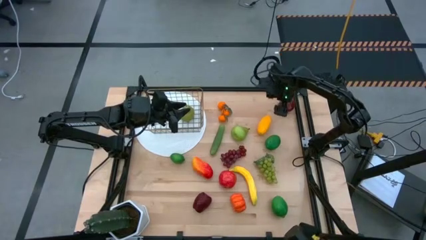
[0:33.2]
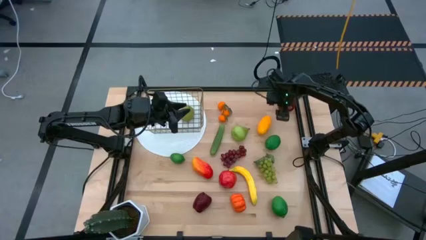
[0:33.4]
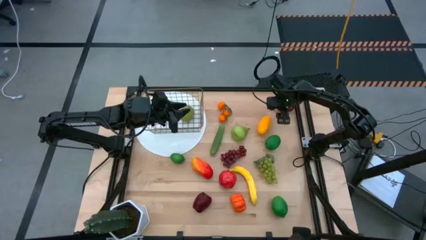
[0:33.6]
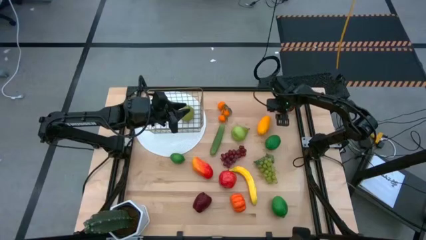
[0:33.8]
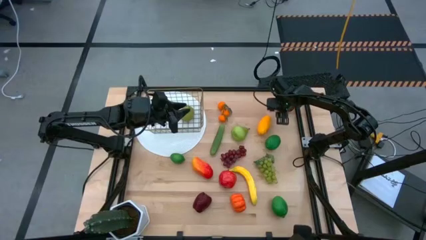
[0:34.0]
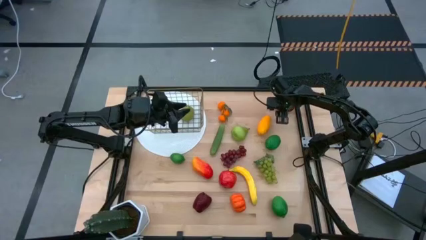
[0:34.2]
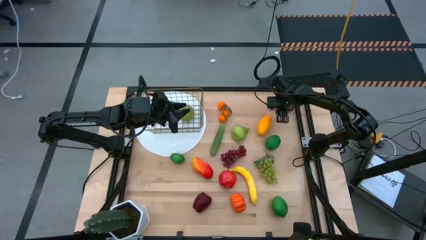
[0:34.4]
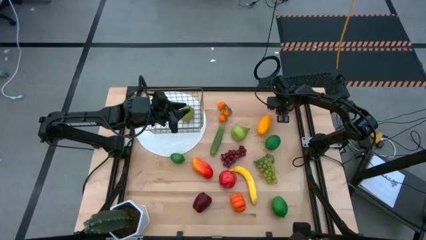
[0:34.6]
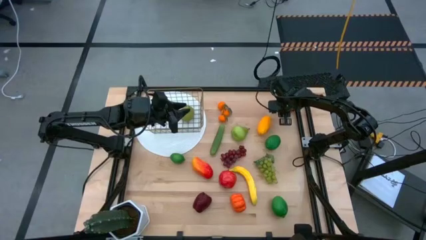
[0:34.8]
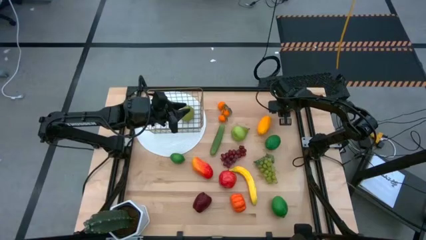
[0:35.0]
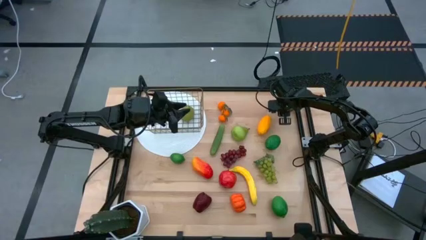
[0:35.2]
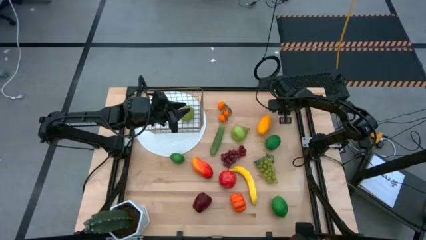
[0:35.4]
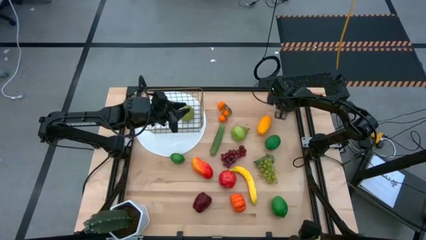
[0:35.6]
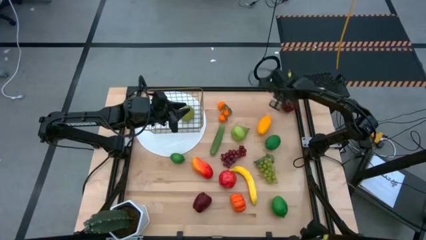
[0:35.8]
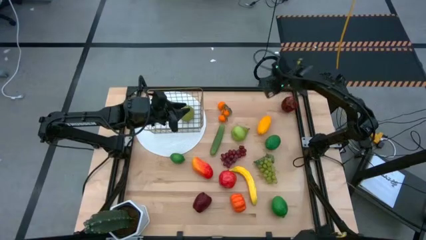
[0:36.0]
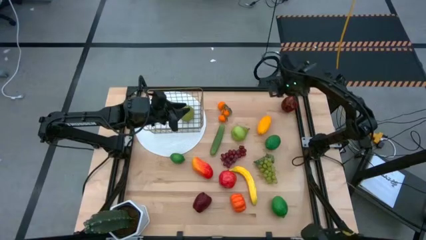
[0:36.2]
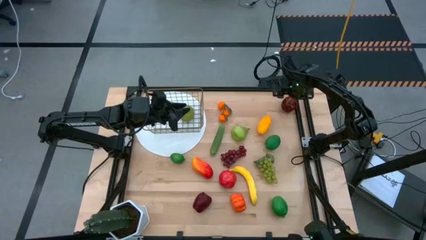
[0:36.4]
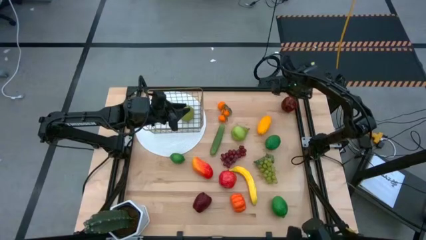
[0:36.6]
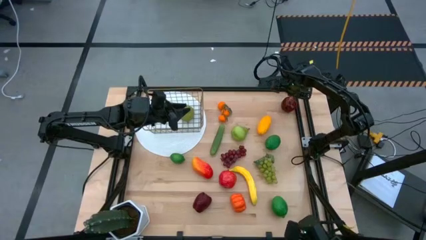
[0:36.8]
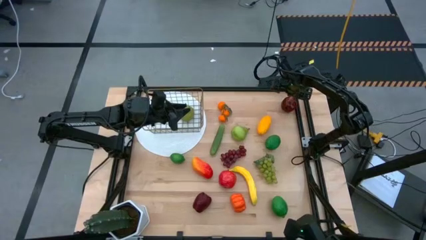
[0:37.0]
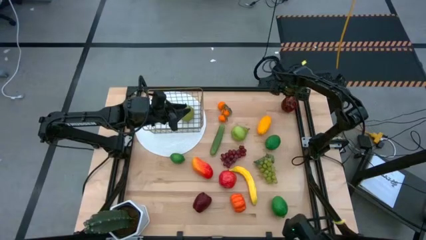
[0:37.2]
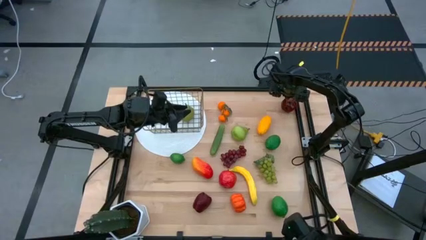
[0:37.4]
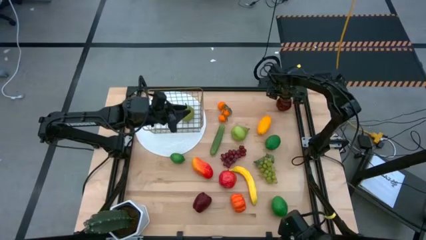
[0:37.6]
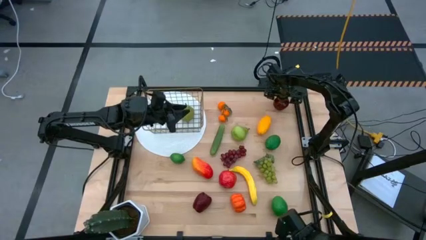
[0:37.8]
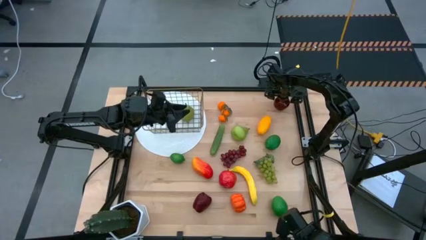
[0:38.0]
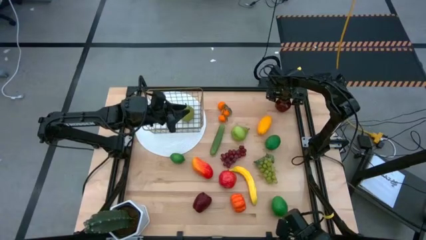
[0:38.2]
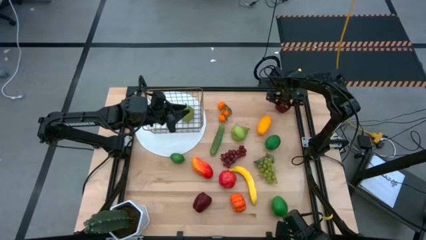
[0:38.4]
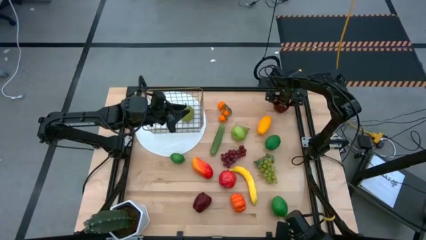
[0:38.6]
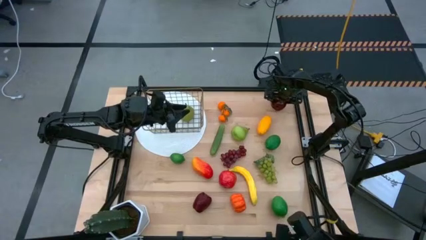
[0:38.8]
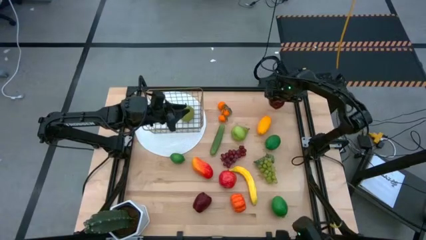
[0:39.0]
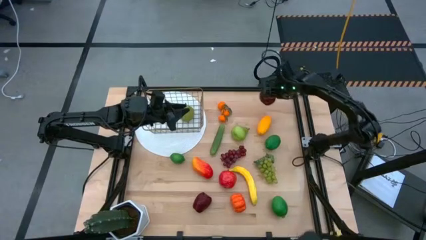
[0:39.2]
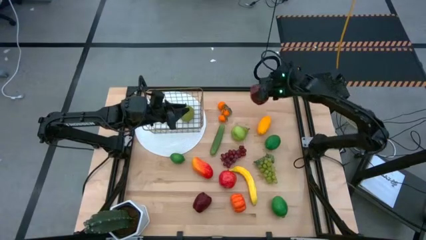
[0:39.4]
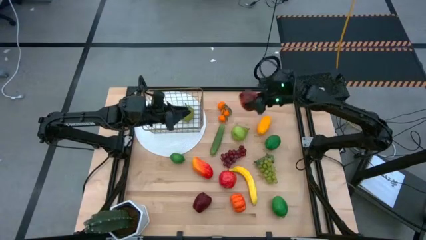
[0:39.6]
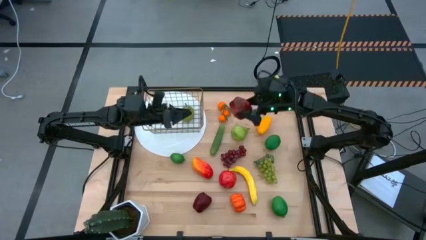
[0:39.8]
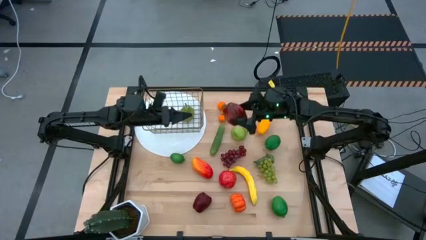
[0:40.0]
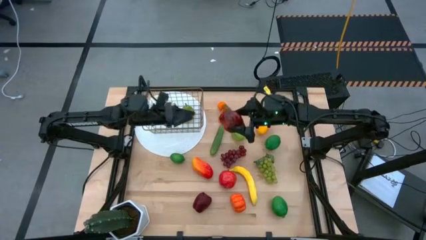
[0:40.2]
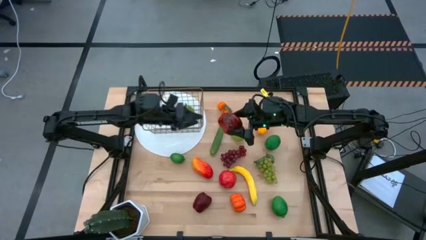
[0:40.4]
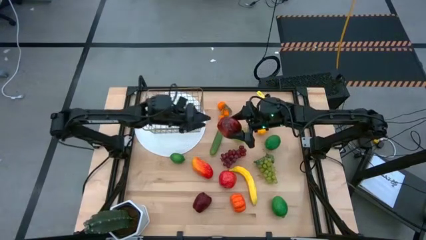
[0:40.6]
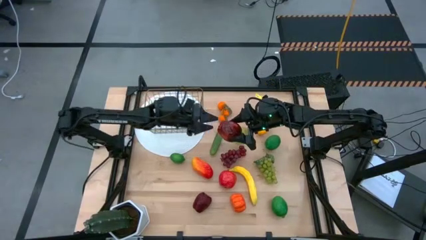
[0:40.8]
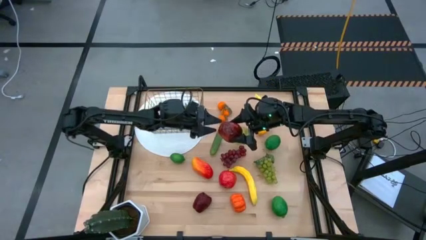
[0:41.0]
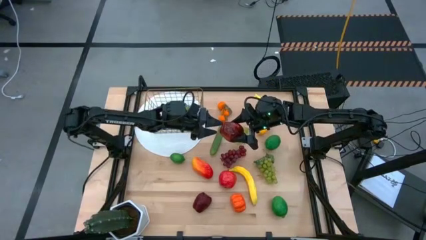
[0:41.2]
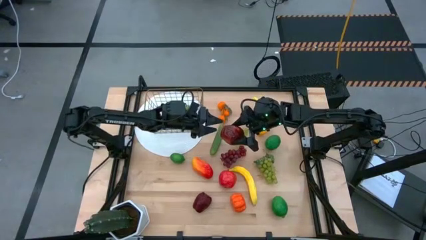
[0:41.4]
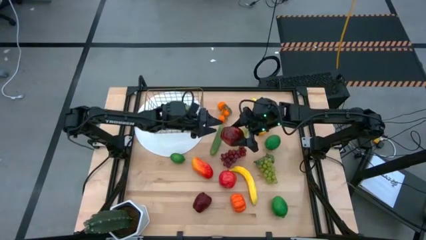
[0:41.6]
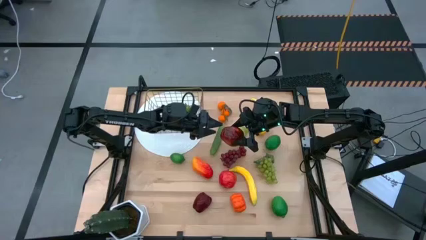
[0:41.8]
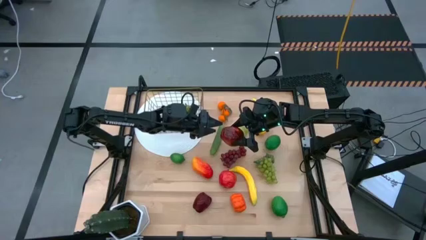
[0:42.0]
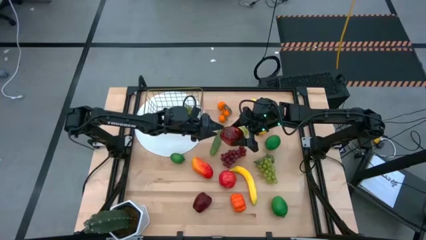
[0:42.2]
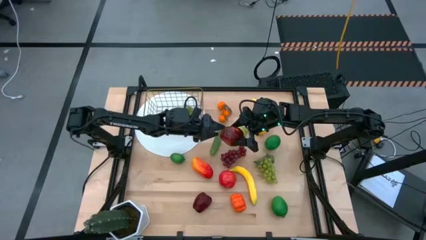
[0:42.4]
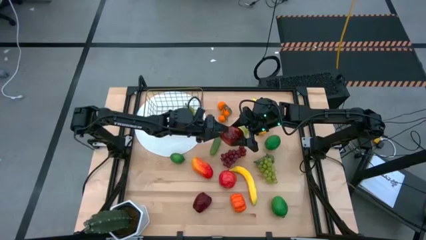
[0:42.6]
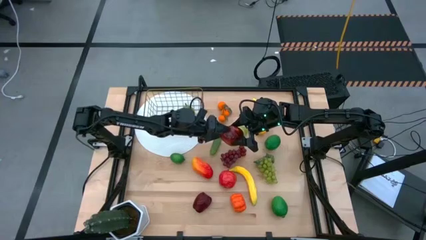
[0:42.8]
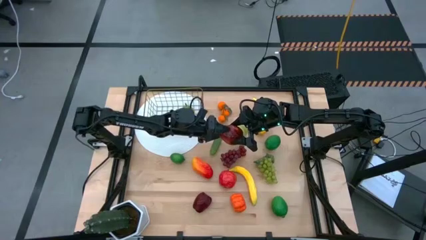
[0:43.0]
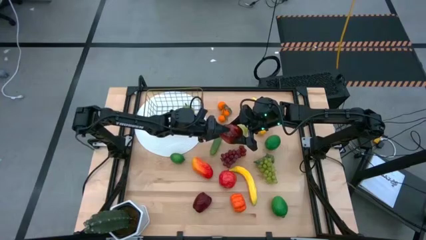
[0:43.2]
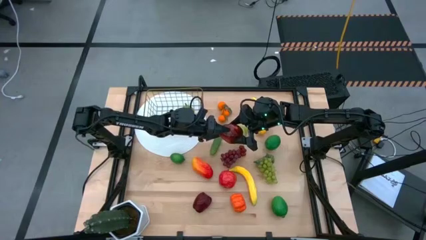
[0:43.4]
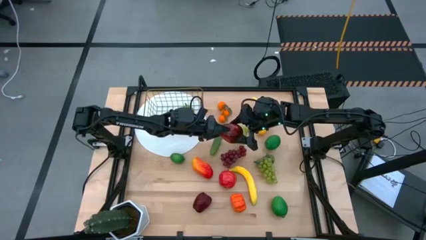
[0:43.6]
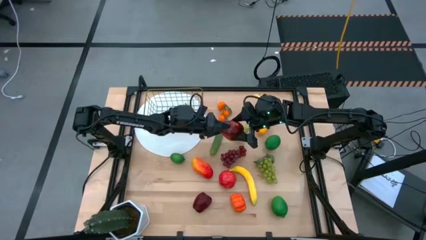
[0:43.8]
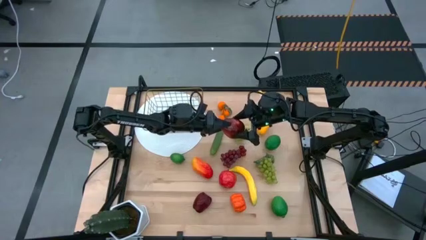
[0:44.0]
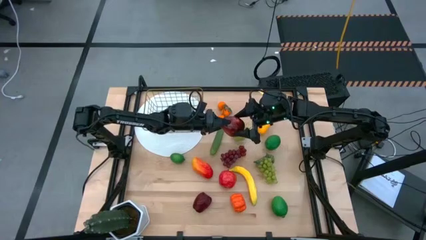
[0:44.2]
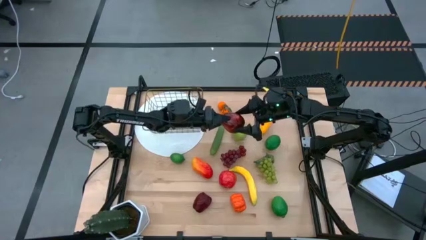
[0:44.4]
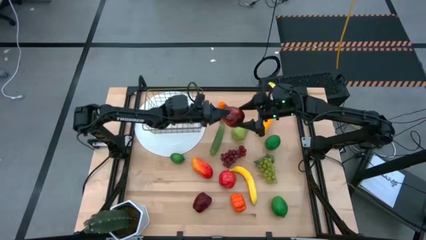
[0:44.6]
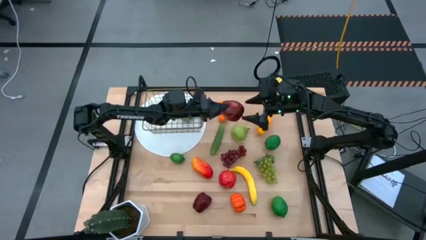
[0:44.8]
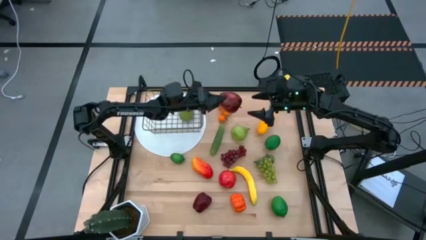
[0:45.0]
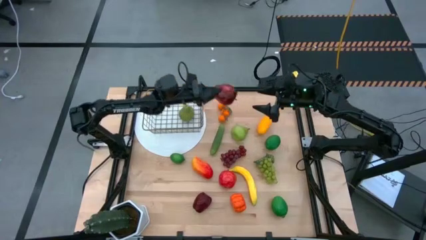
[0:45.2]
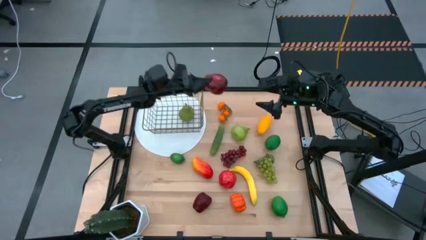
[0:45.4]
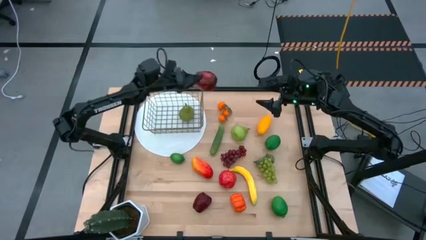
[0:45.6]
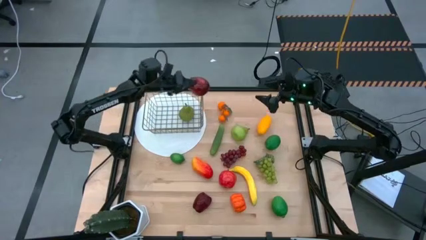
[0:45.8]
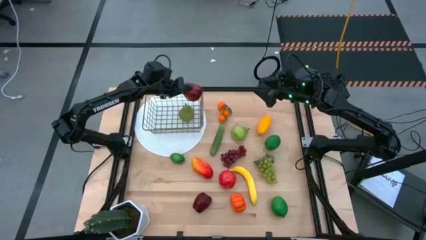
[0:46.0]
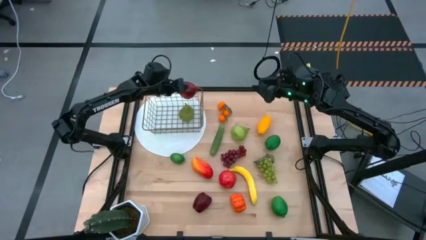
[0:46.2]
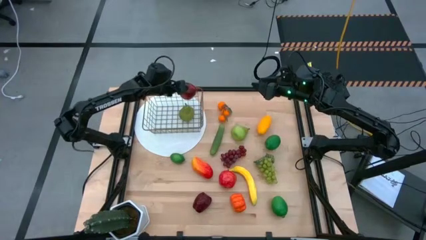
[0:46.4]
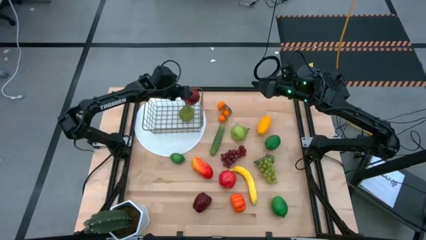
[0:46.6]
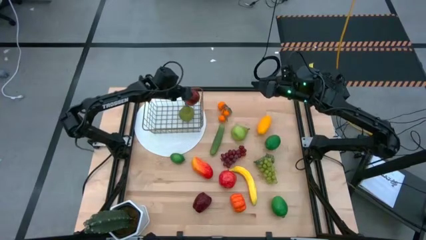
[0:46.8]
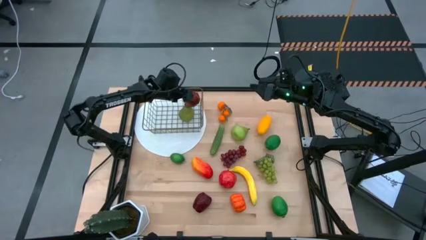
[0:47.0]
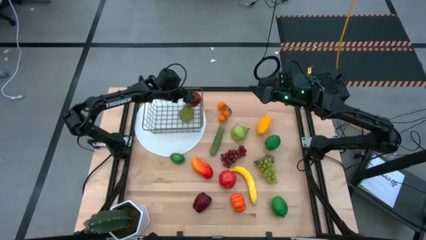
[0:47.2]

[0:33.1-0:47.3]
Task: Build produce basket
Put the top apple into the wired basket

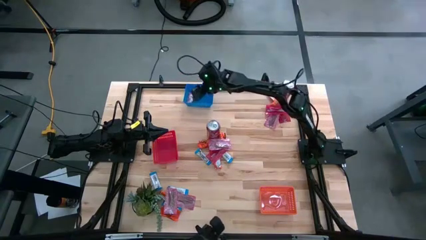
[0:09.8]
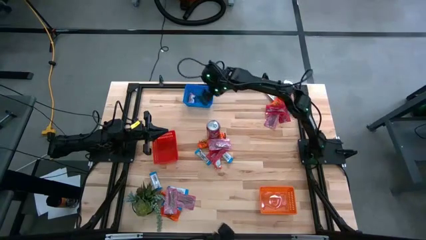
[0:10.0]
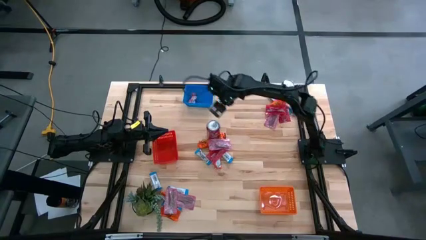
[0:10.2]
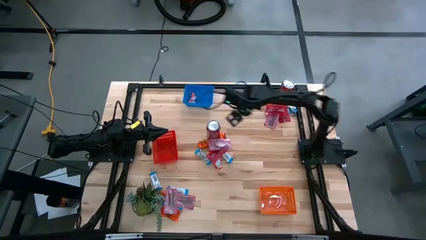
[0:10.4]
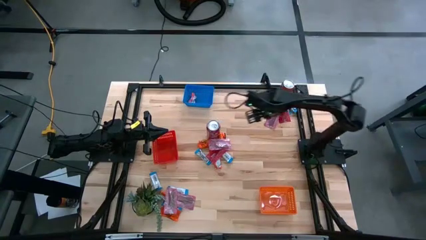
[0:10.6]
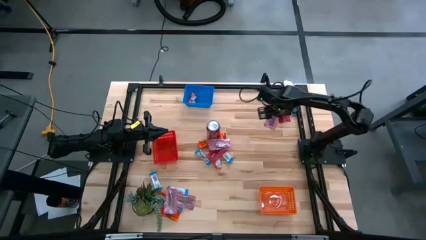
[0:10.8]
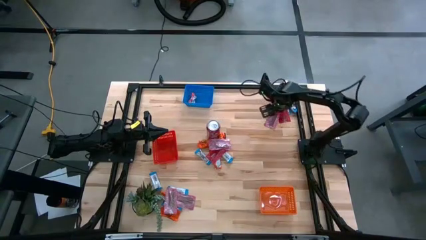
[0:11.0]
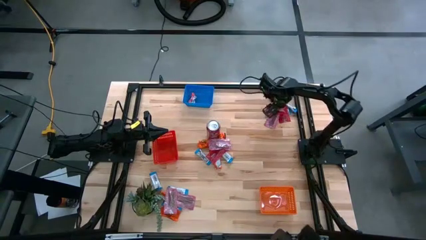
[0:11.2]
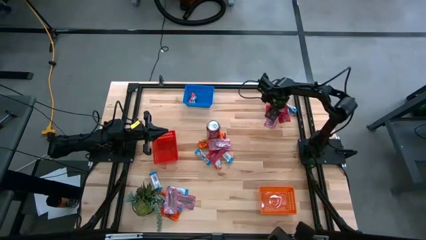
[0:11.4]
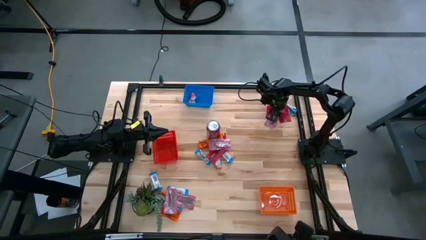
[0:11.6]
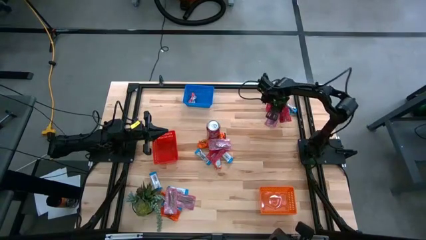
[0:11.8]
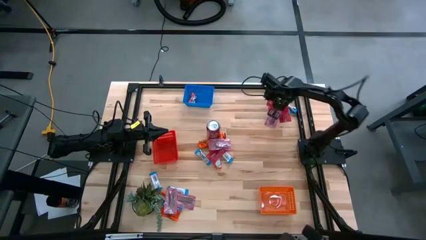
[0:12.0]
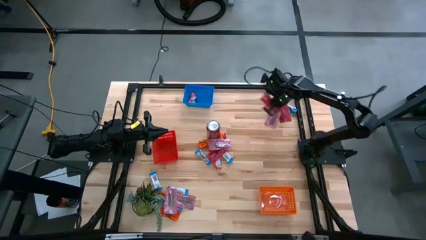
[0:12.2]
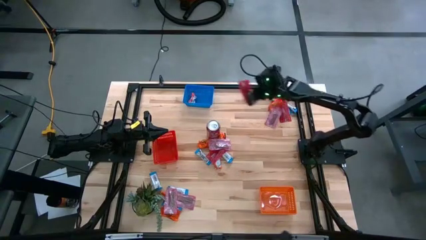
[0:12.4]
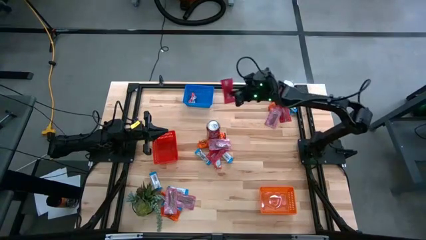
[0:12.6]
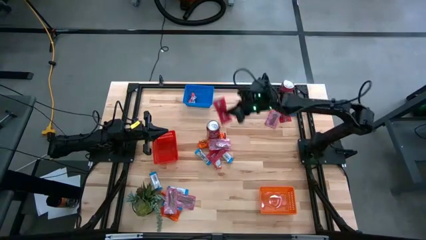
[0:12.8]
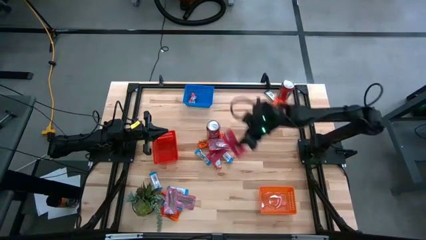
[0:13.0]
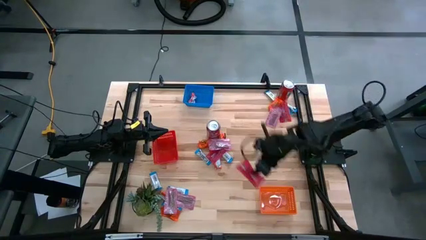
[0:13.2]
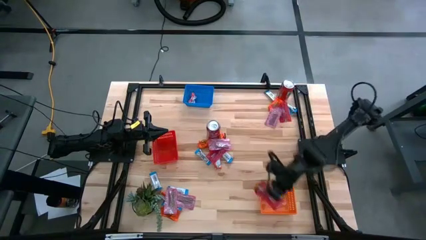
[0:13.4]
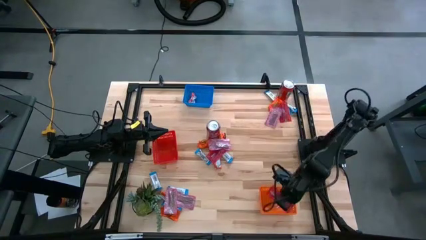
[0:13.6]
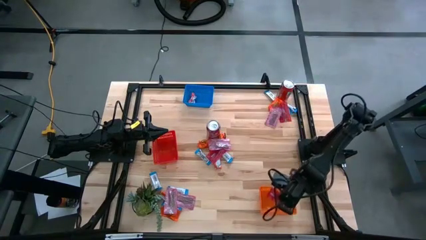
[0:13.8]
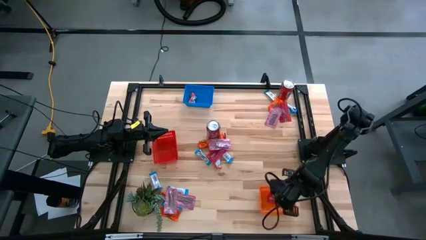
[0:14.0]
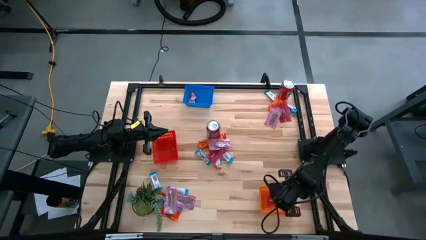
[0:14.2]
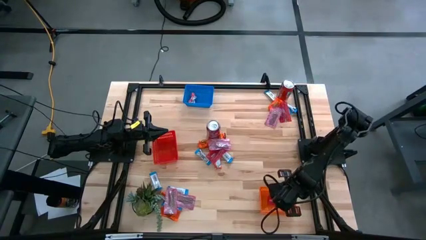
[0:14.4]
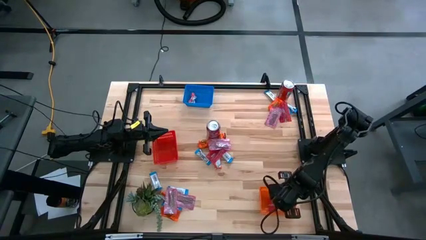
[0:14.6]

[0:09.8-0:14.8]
Task: Sort candy
Put the red candy into the orange bin
